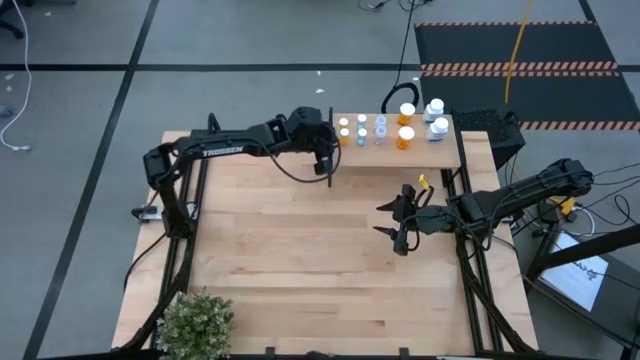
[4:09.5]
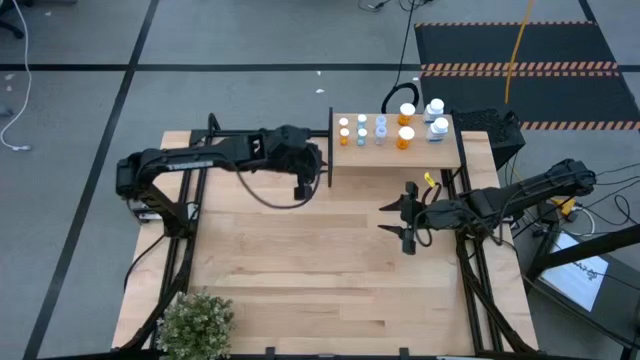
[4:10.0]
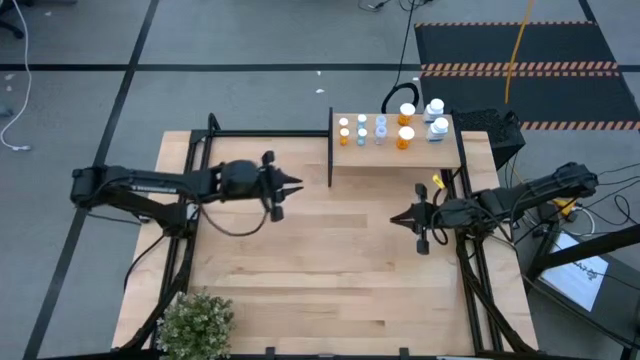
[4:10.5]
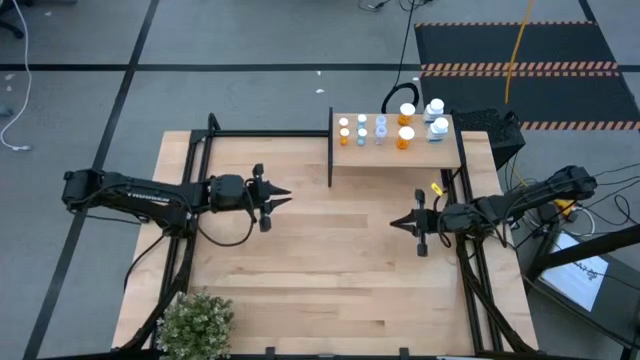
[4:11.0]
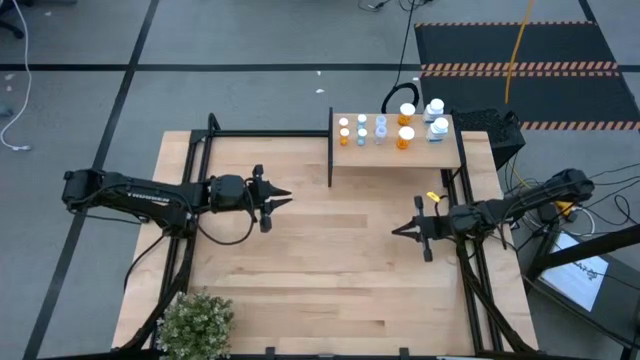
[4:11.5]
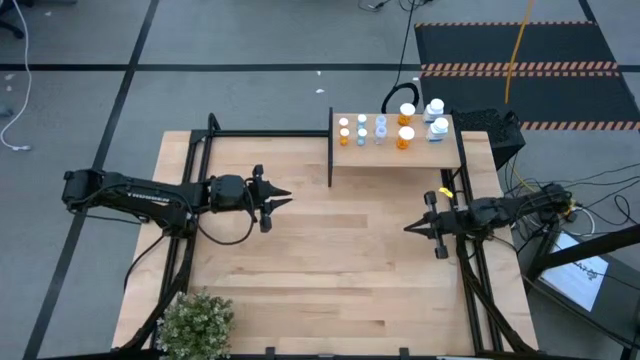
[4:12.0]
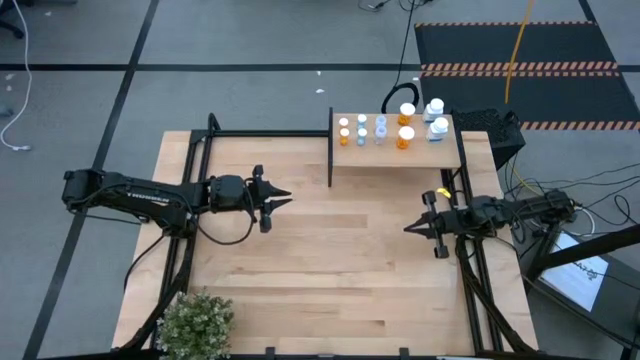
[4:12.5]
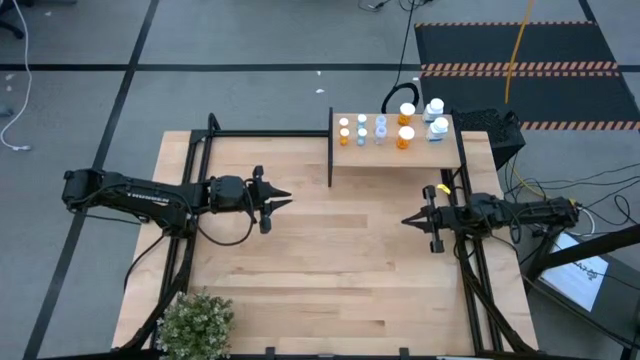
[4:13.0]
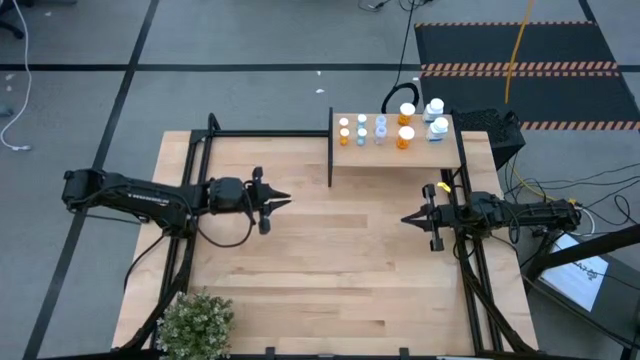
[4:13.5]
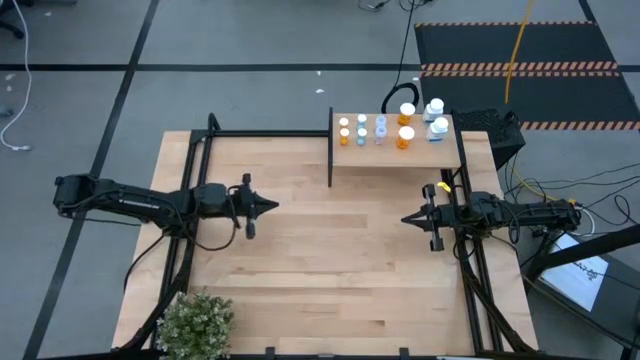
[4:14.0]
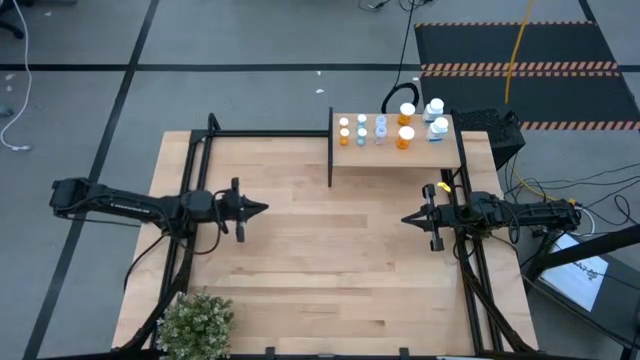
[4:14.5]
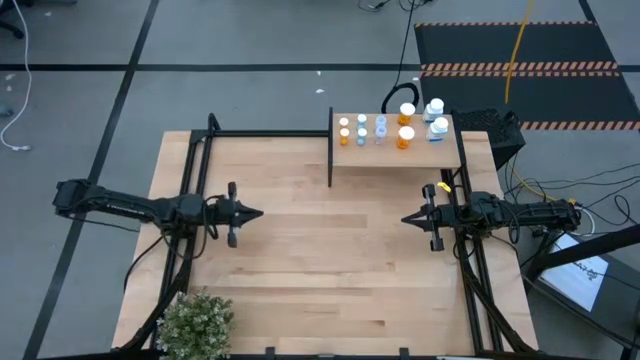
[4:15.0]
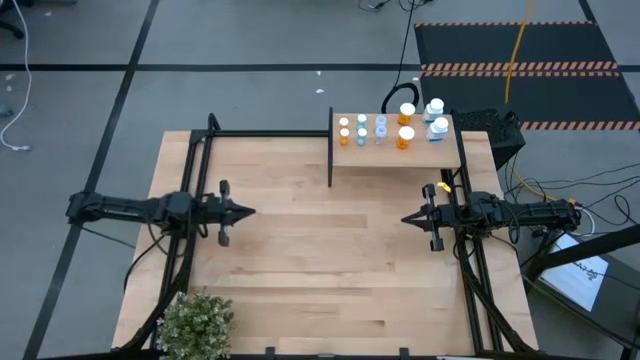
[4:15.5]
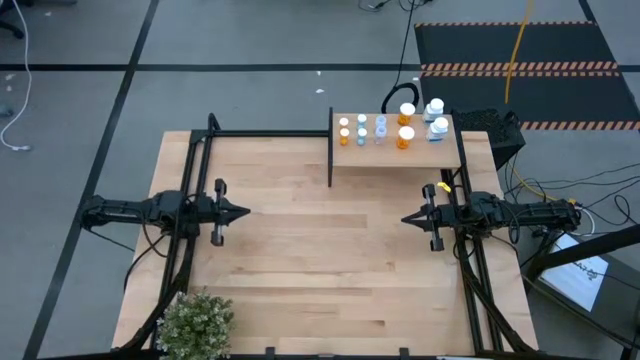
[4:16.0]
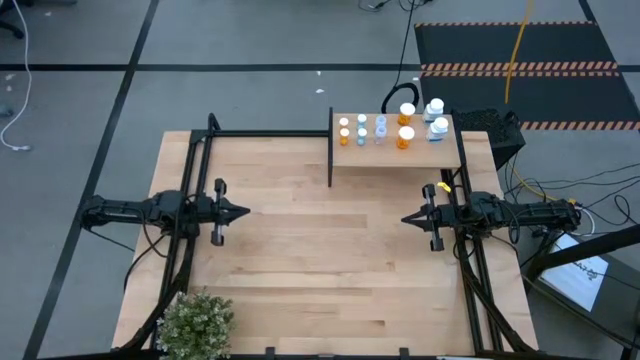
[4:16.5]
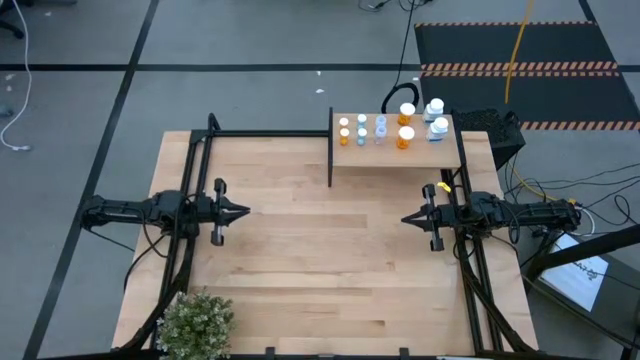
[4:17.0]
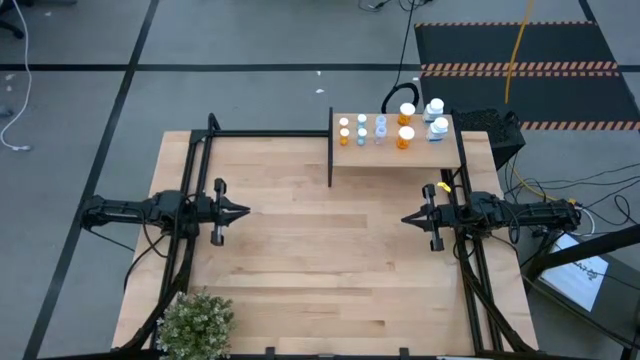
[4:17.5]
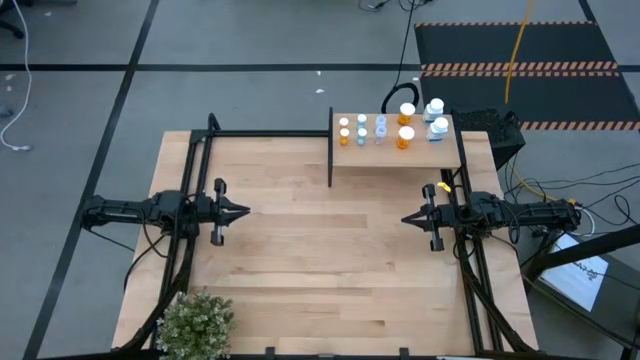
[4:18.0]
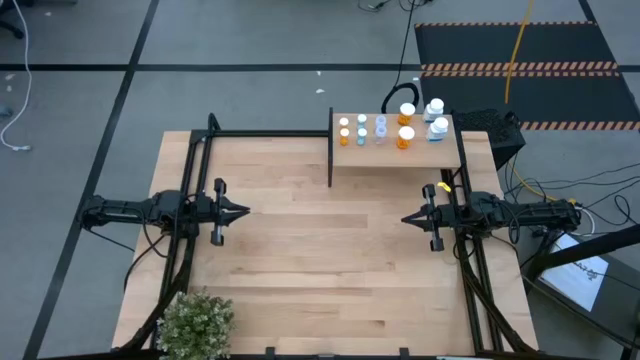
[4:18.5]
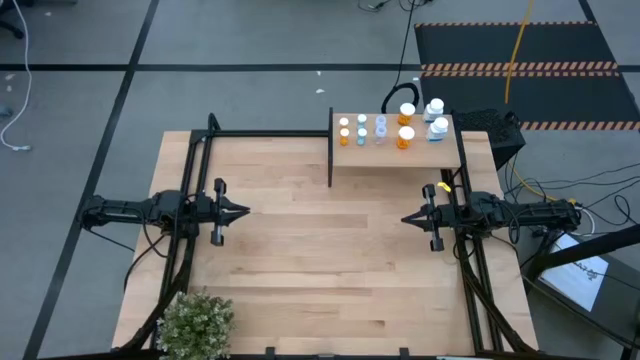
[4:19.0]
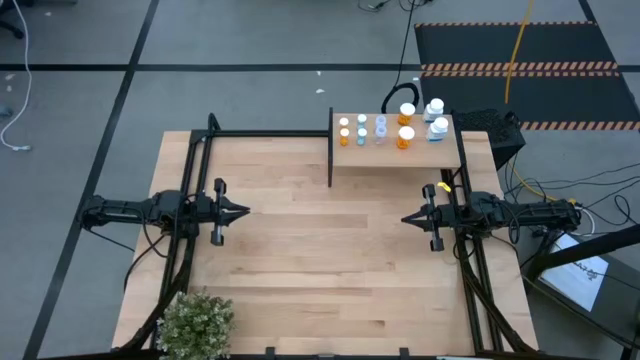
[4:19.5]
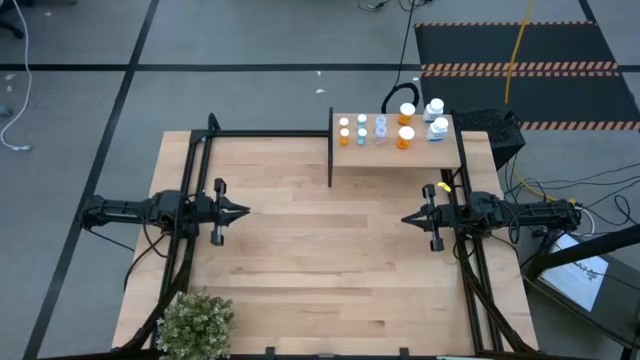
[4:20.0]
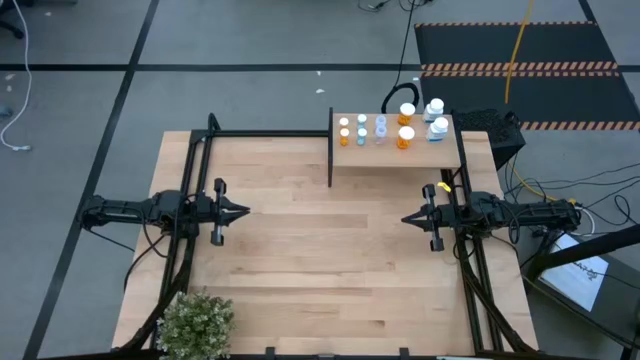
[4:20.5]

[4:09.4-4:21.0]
Task: Pick and place medicine bottles onto shelf by color
Return to Home Position

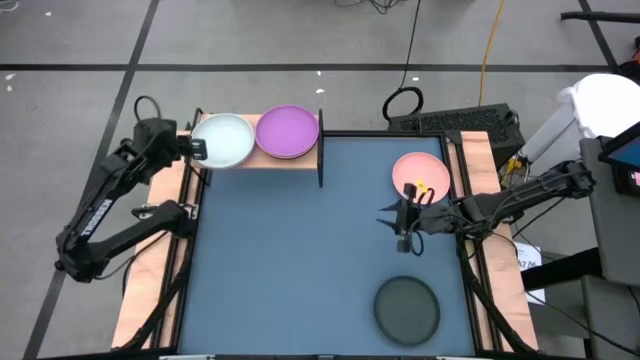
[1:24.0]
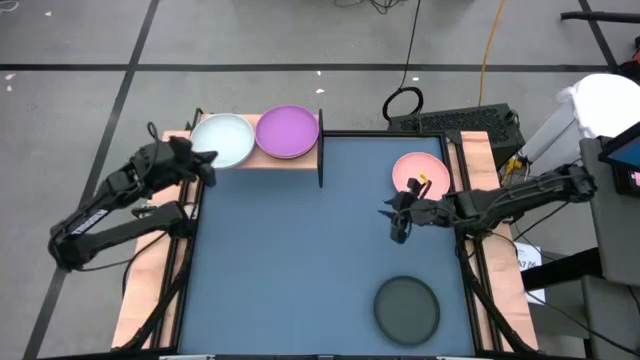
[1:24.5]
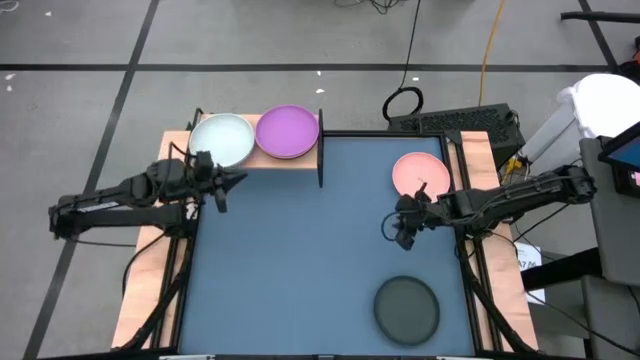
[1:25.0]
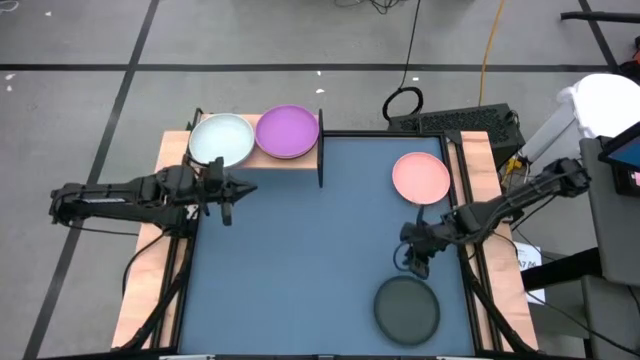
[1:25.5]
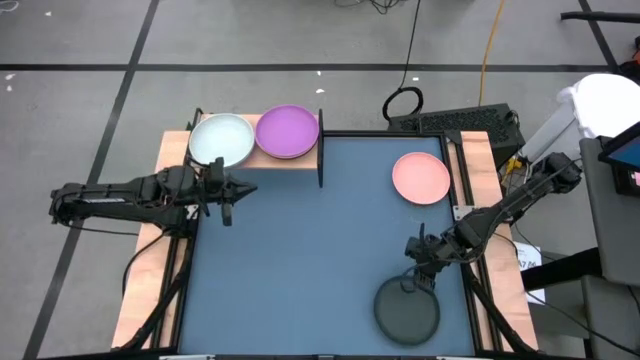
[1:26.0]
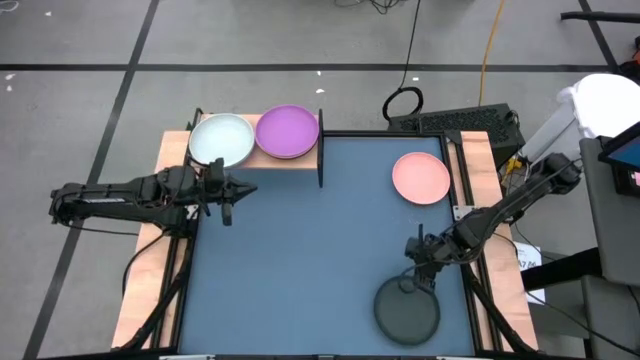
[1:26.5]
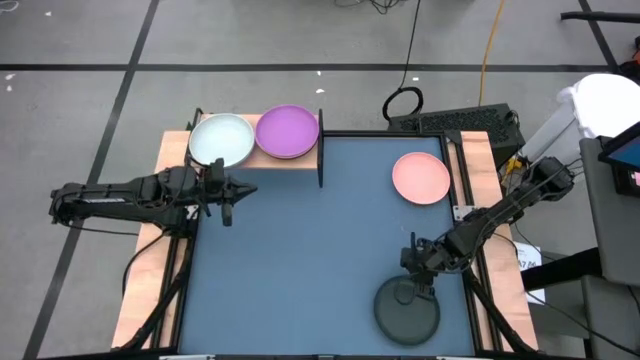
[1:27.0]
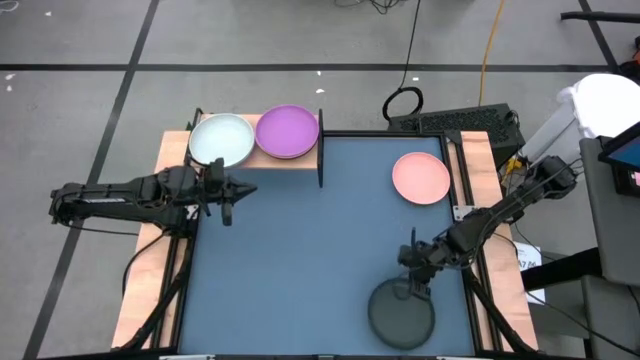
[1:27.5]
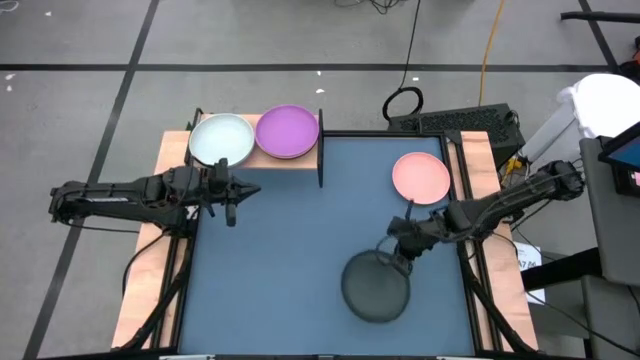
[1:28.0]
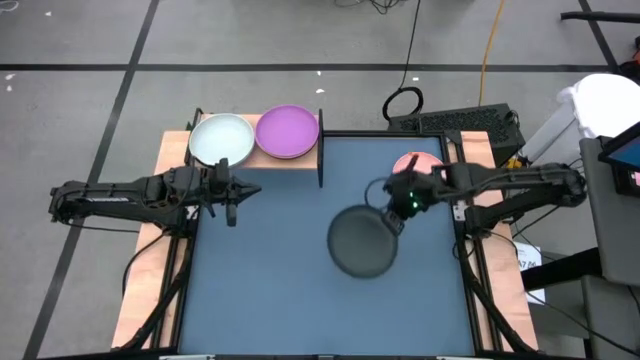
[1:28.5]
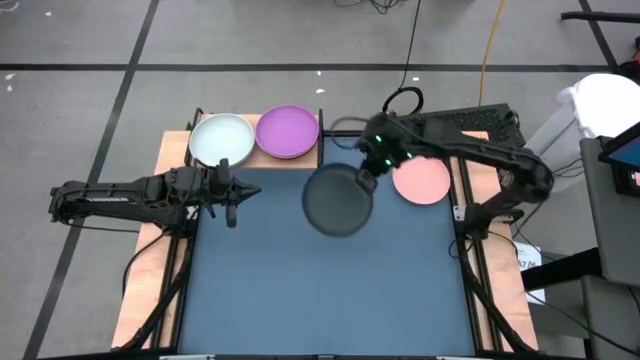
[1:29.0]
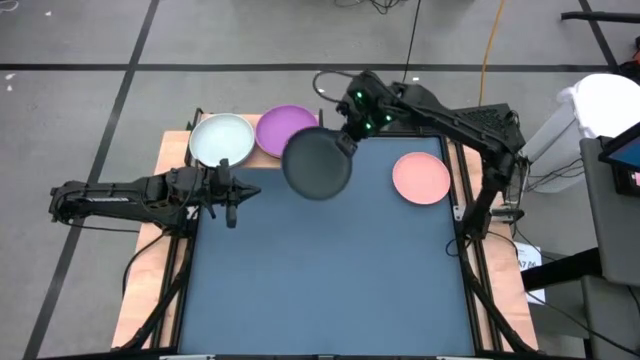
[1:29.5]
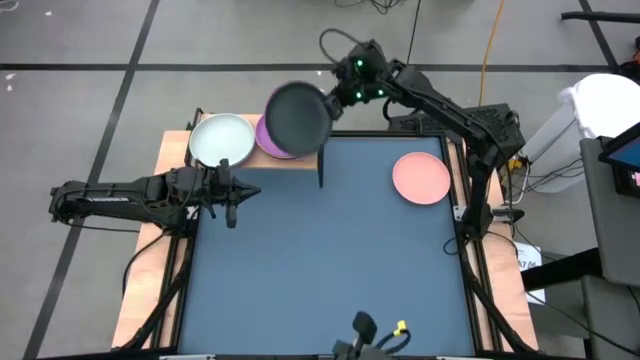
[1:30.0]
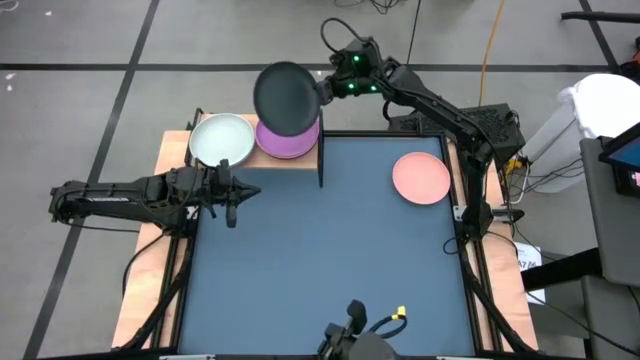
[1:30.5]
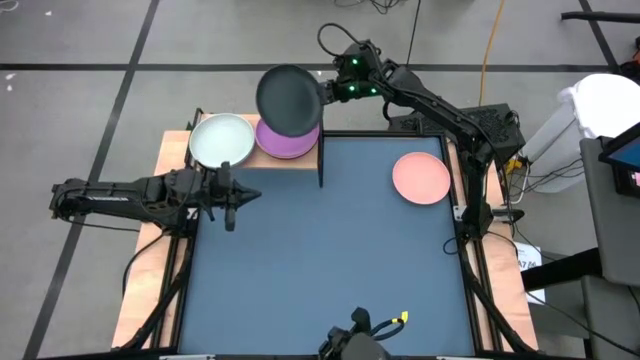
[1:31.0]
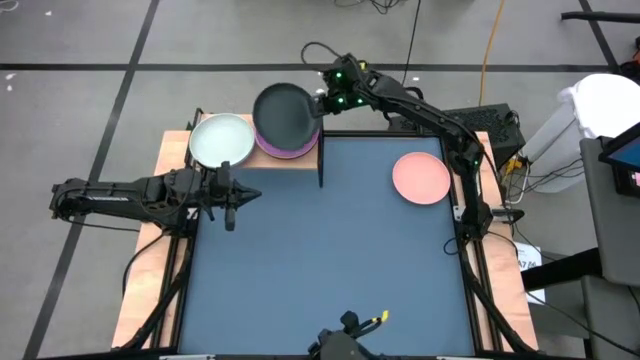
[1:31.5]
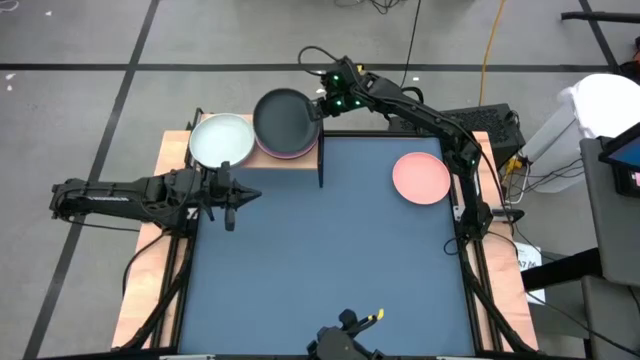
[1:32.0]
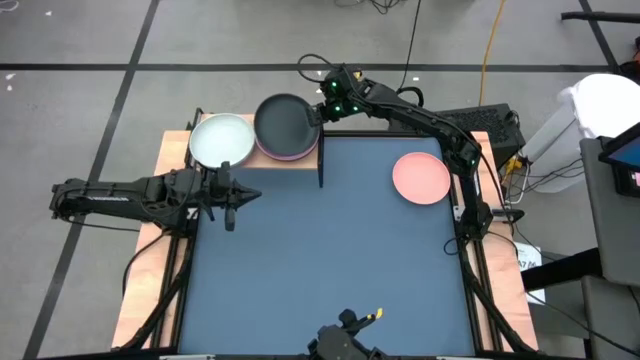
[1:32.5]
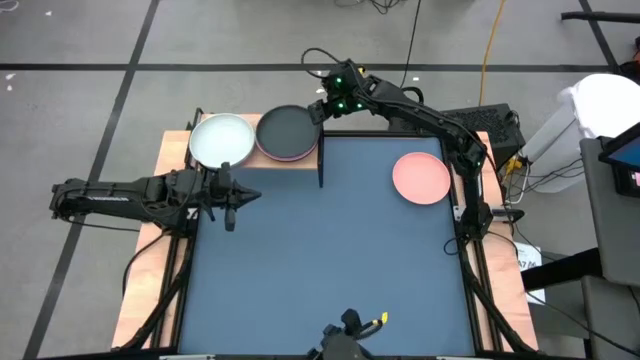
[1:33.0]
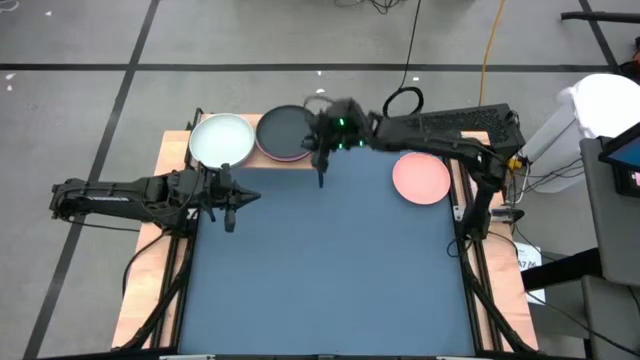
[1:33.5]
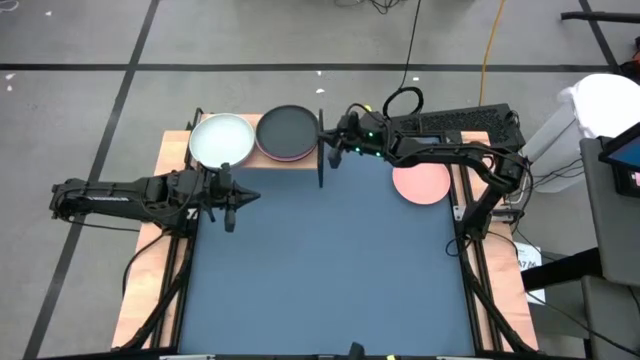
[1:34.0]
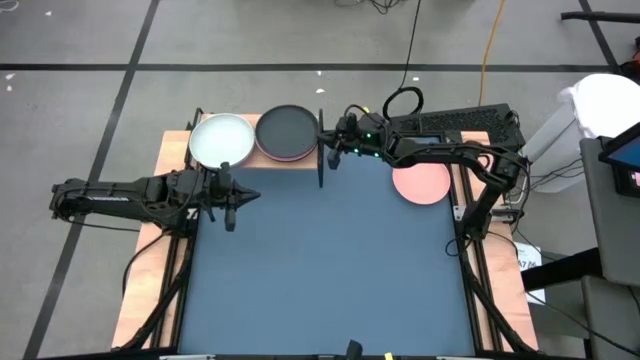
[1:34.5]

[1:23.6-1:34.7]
Task: Place and stack plates onto a shelf
Stack the black plate on the purple plate on the shelf
